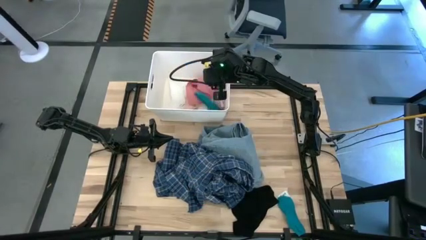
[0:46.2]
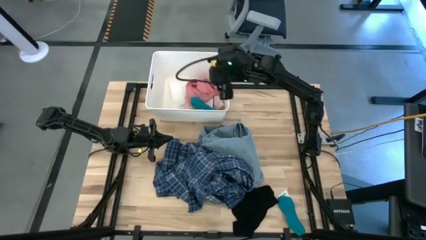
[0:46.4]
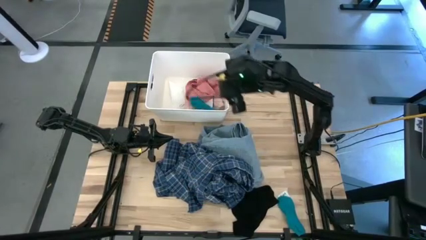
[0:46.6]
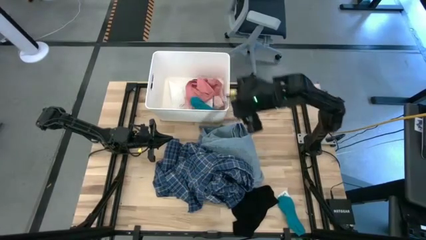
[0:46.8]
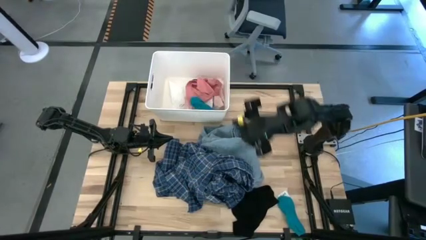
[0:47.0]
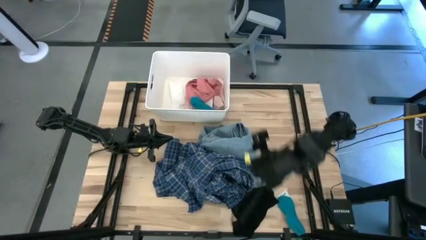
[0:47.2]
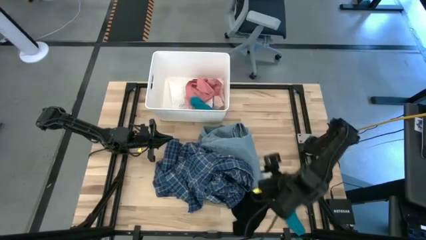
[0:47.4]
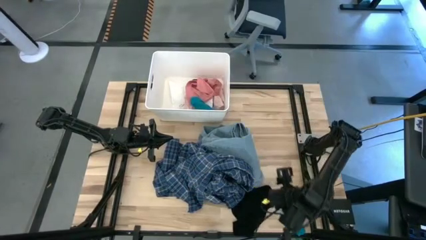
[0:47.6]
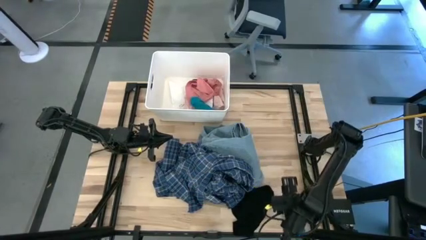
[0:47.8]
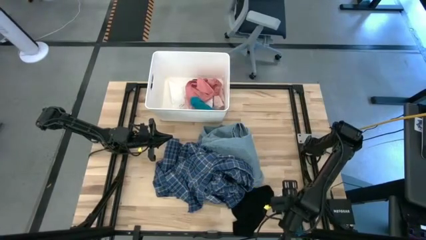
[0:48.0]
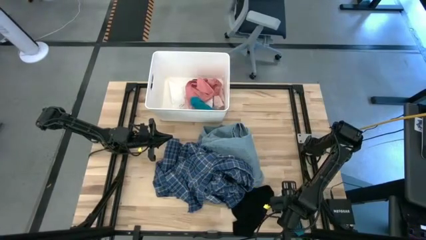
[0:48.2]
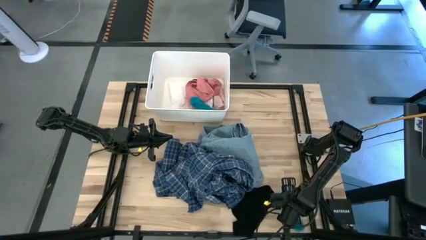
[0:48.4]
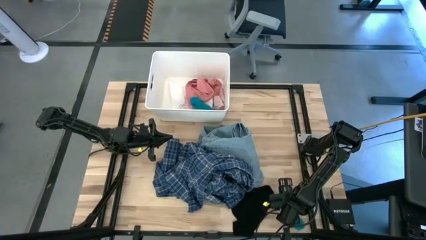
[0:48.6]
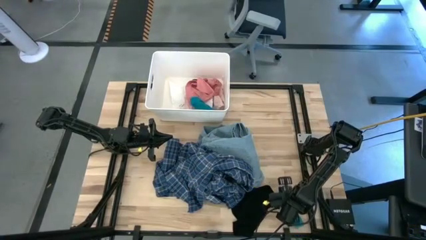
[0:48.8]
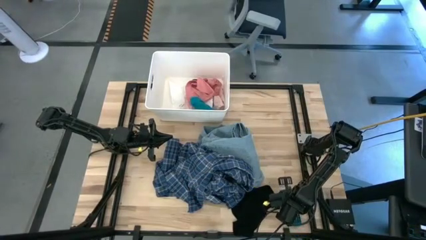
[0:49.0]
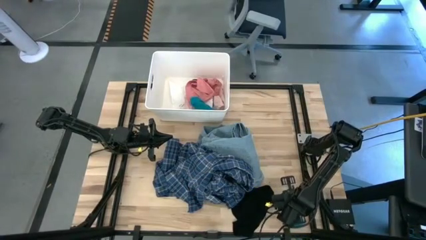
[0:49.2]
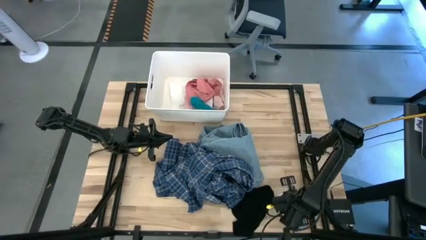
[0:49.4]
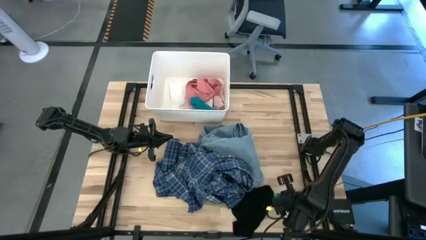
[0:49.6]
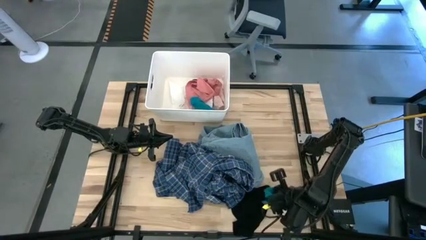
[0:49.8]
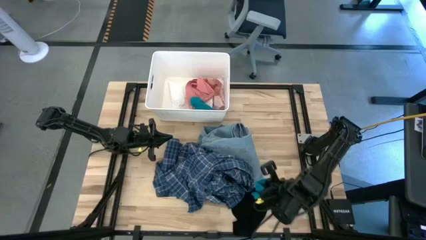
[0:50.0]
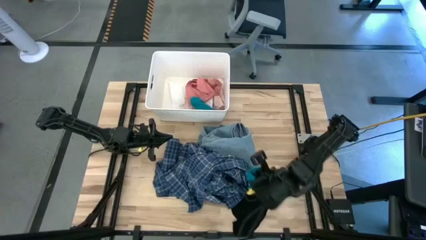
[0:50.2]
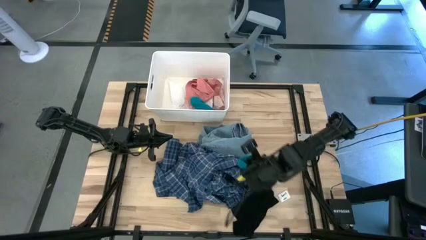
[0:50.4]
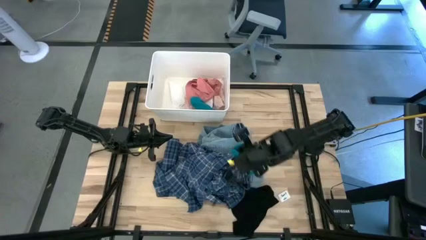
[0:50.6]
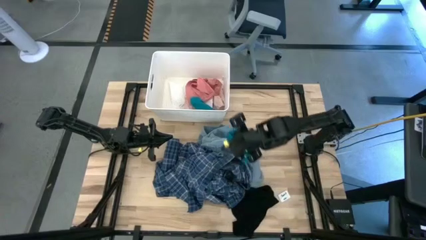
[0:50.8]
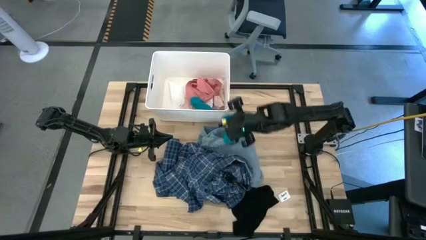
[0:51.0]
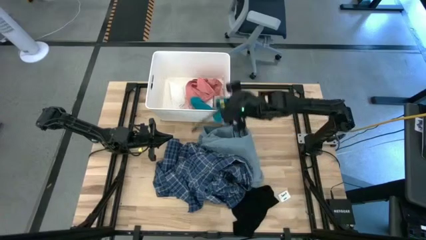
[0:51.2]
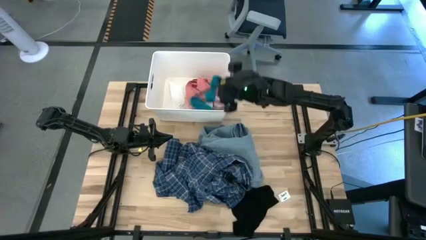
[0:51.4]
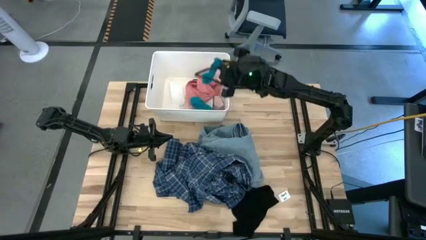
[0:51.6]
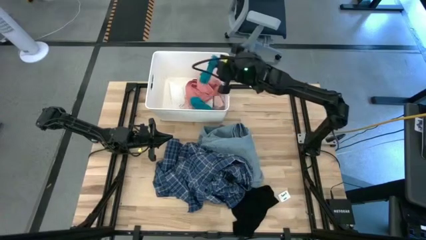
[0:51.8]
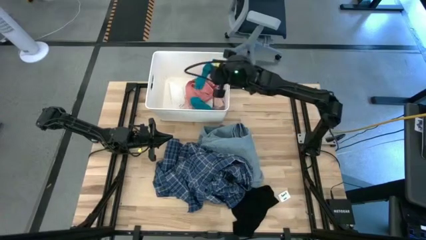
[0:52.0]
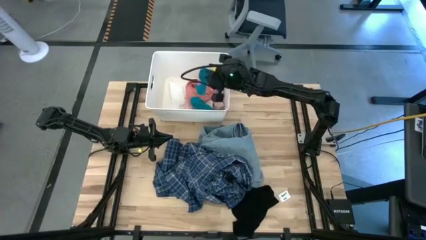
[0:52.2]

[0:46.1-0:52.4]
Task: Sort clothes
Put the blue sock into the white bin

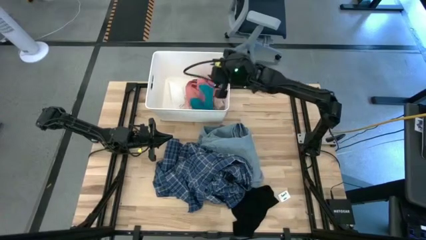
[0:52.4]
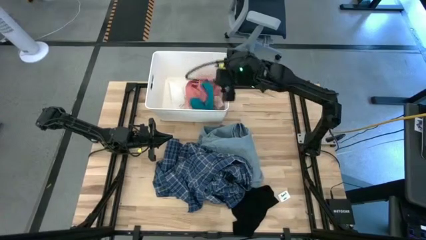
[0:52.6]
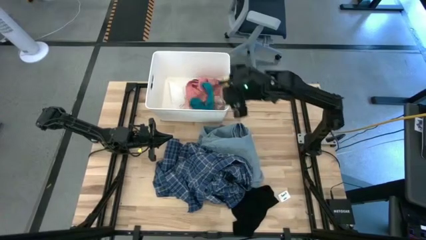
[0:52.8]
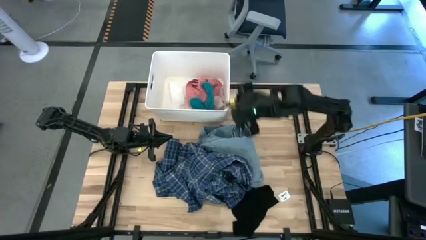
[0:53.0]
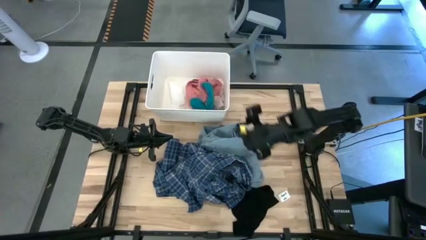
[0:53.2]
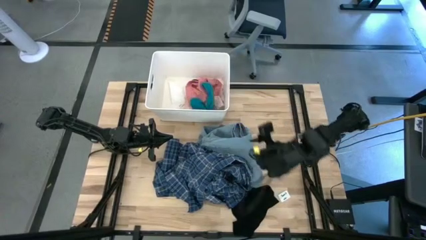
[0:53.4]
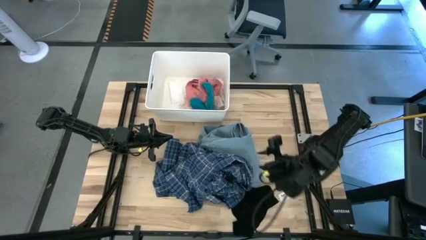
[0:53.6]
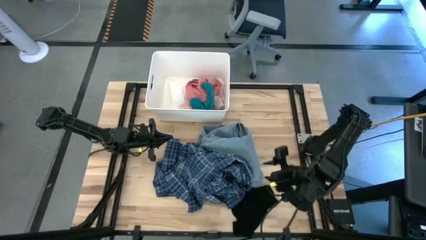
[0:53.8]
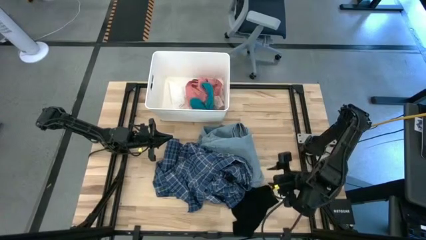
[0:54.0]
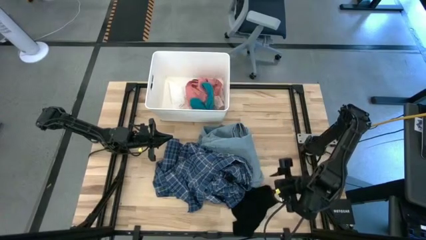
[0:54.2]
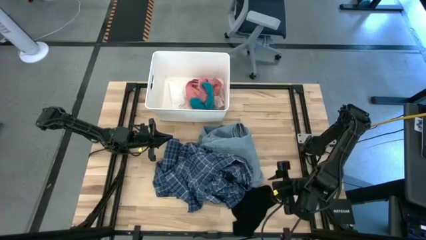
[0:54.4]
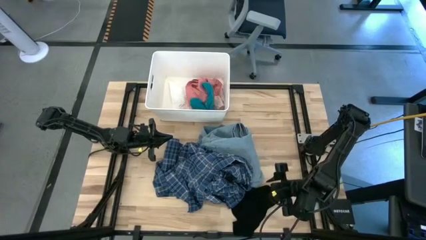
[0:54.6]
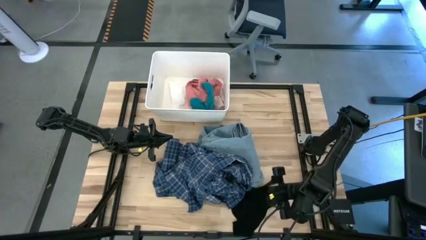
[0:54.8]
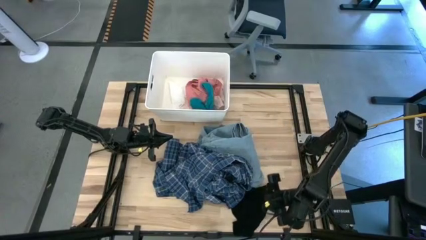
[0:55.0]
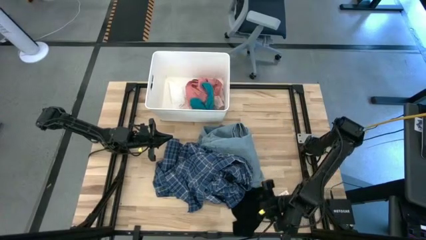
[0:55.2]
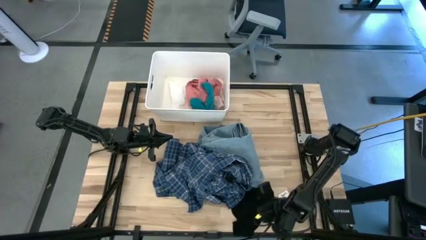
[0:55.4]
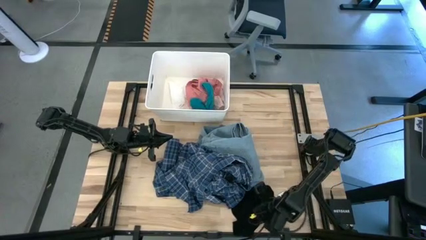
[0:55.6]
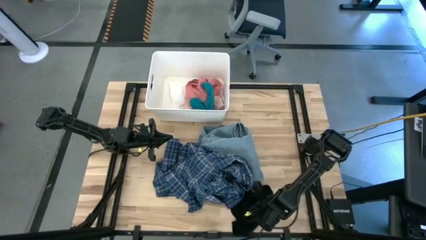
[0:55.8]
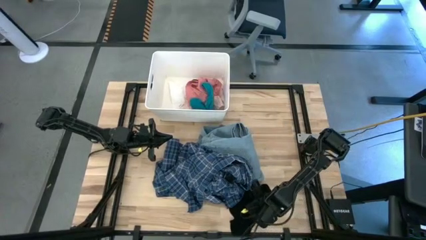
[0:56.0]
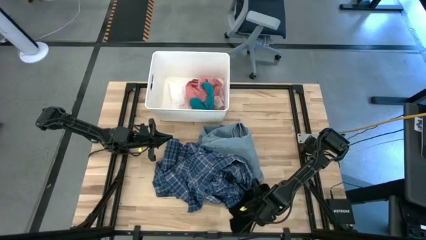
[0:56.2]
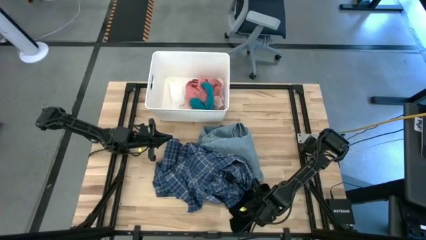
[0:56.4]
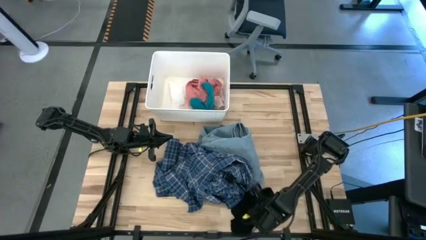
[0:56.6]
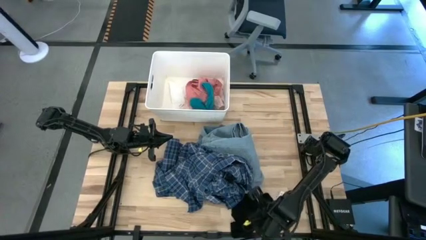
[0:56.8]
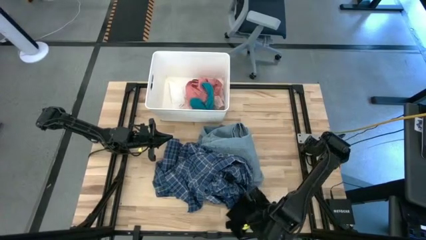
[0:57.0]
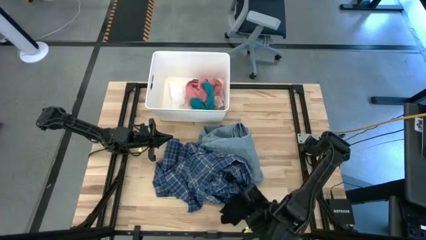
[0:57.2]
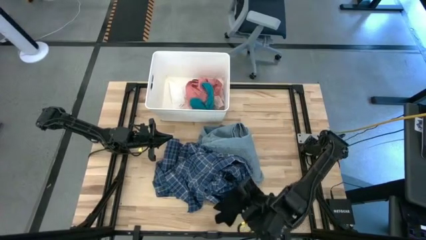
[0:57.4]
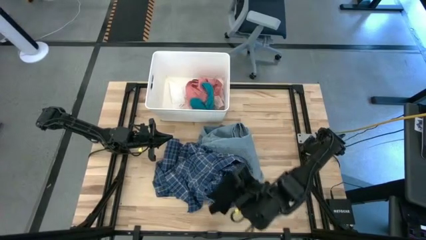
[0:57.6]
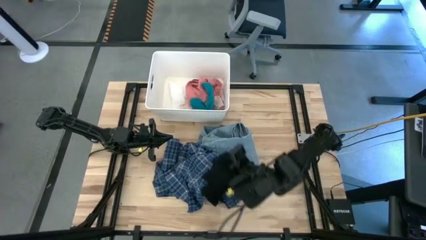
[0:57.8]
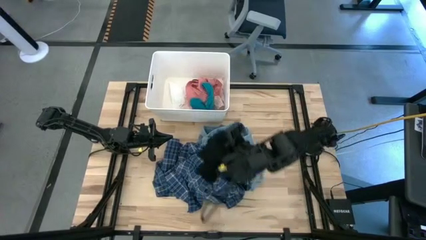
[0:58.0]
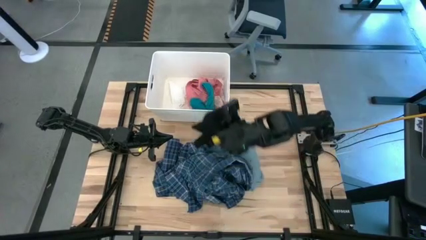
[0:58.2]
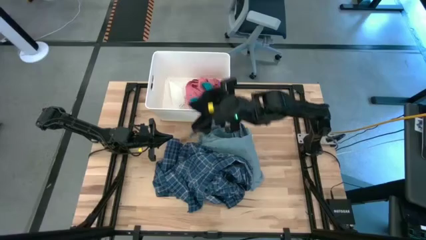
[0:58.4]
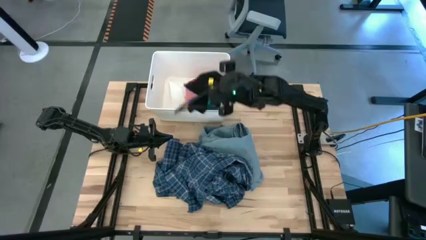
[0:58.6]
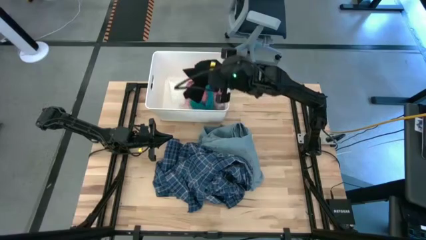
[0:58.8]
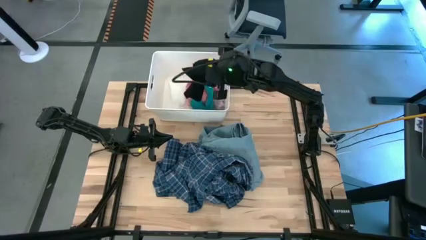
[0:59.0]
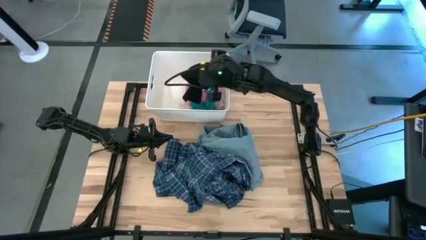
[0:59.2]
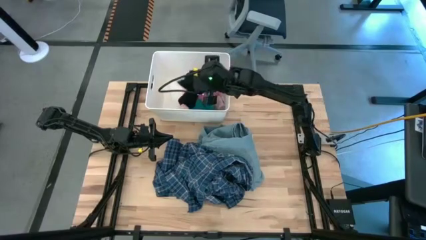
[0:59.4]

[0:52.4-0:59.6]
Put the black shirt into the white bin

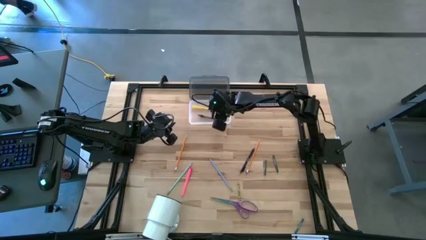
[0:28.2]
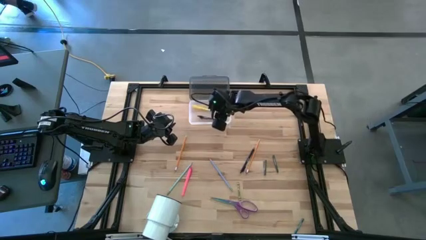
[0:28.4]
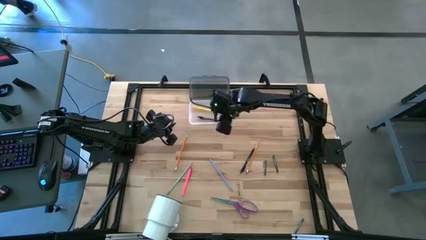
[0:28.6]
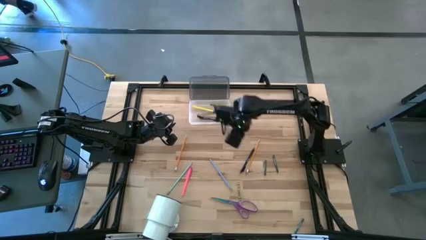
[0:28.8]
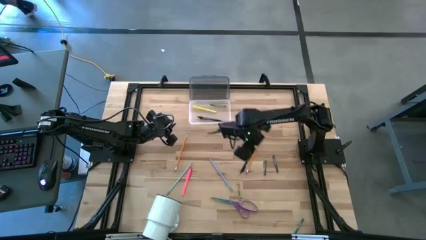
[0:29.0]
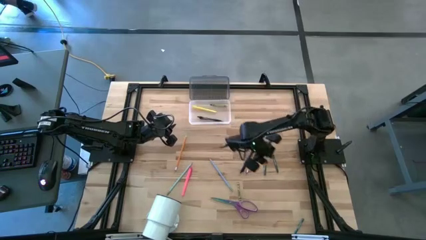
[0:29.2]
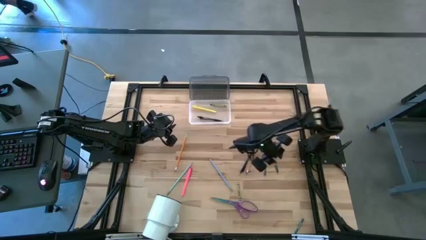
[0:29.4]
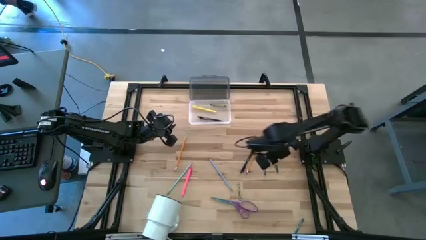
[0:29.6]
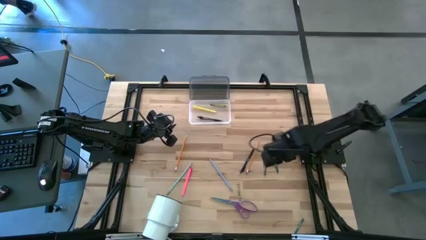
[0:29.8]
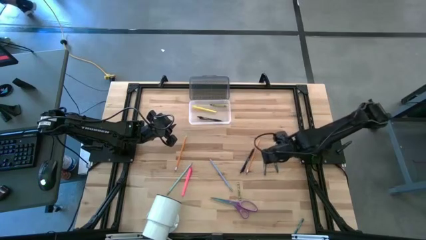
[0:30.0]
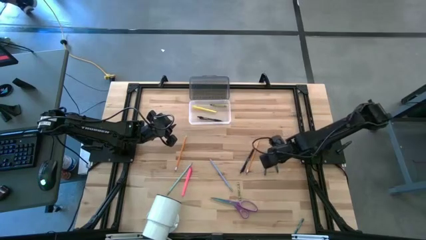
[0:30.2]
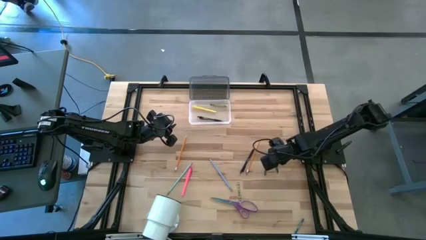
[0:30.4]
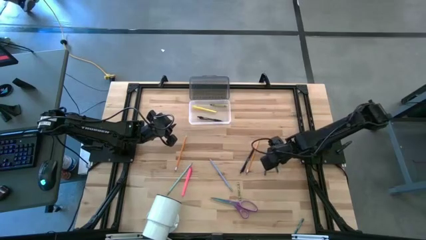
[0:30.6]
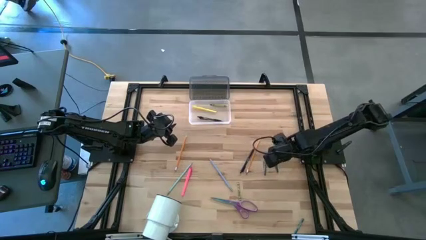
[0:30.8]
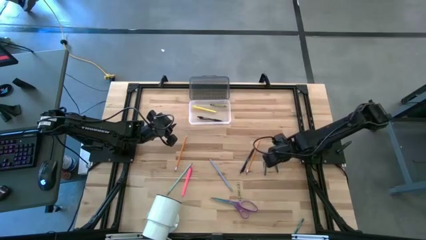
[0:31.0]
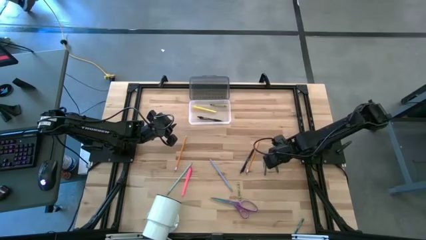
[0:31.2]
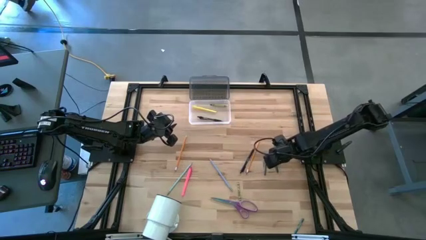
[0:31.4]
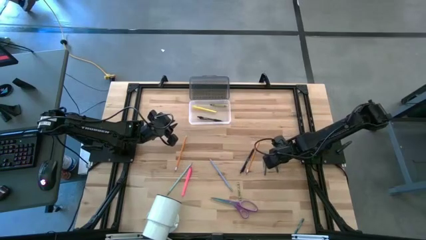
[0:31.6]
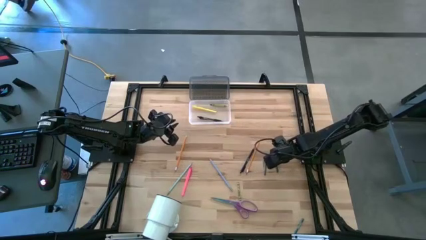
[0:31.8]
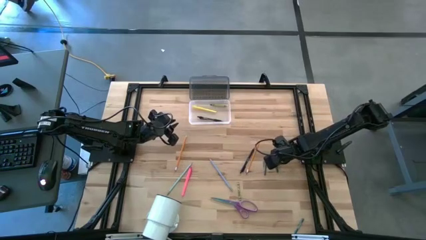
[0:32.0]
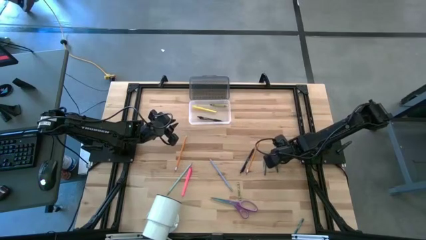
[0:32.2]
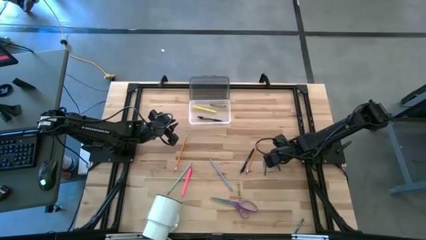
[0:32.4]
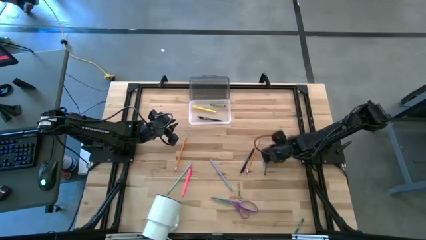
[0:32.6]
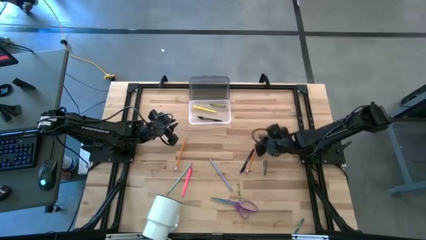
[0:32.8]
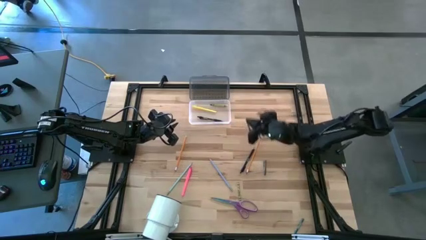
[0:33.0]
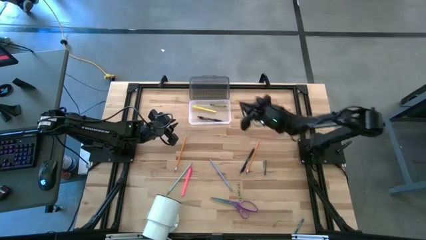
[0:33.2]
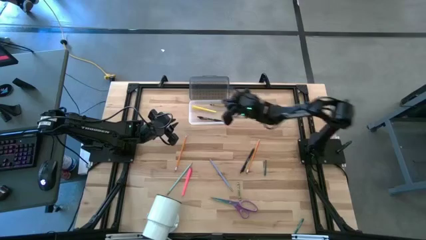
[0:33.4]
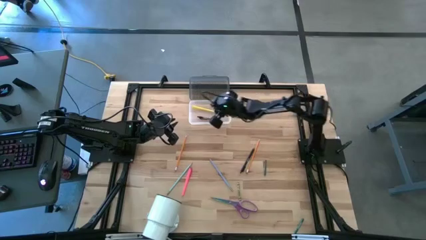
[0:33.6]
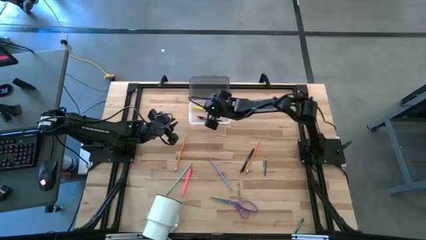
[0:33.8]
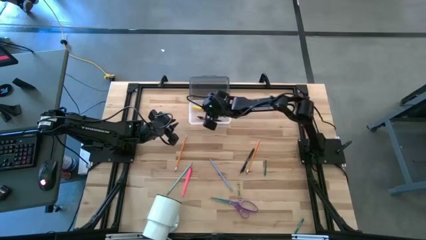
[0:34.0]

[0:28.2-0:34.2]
Task: Pick & place school supplies into a supply box
Put the right dark green crayon into the supply box
